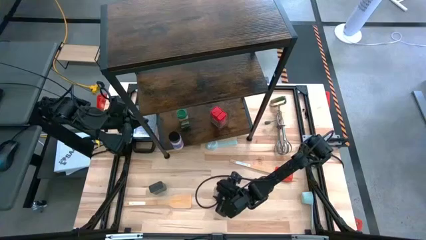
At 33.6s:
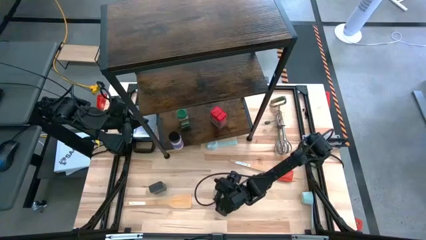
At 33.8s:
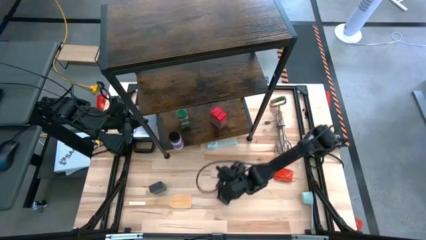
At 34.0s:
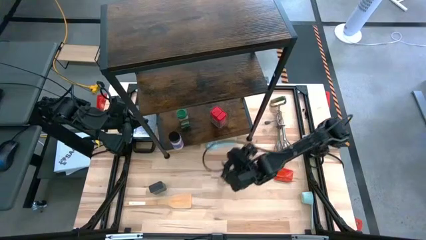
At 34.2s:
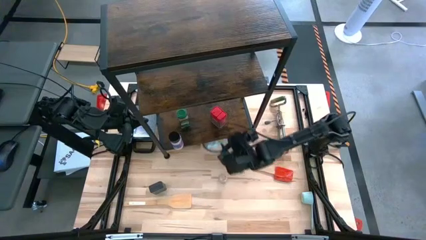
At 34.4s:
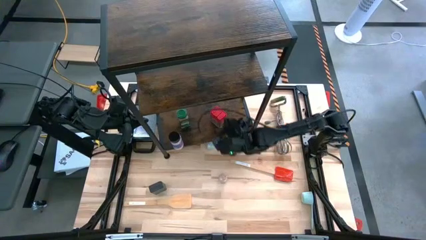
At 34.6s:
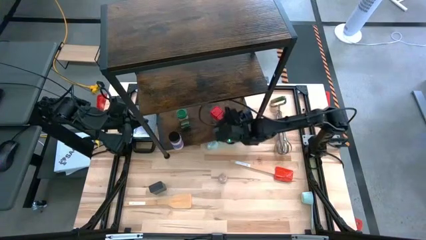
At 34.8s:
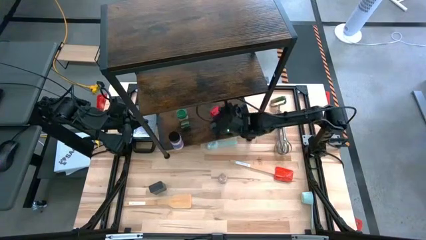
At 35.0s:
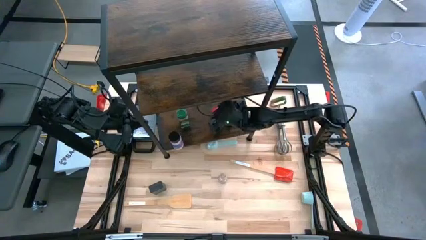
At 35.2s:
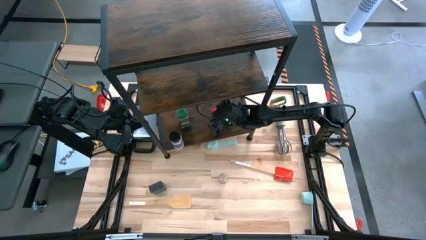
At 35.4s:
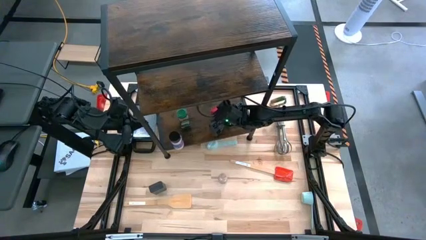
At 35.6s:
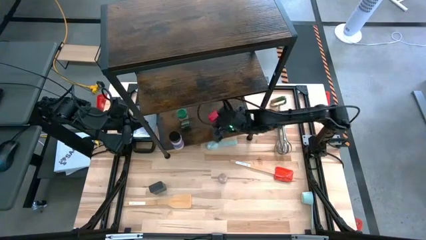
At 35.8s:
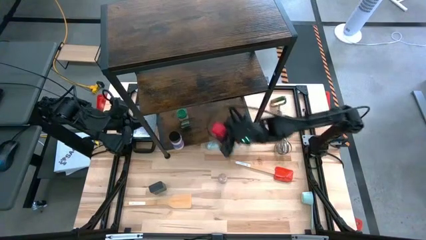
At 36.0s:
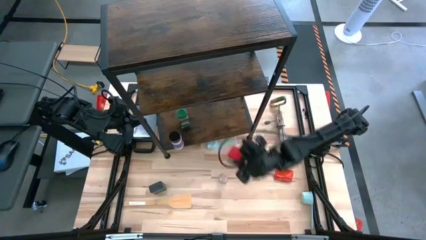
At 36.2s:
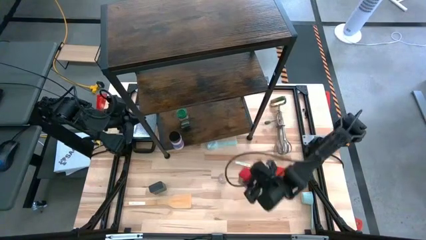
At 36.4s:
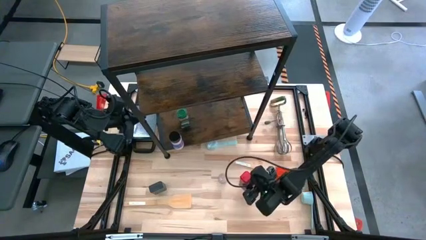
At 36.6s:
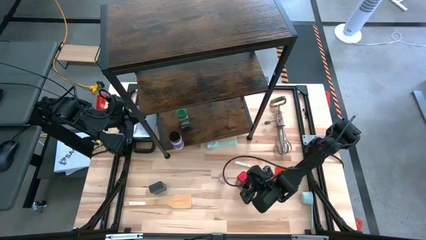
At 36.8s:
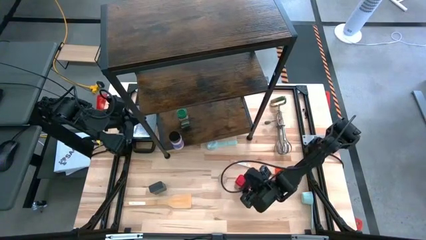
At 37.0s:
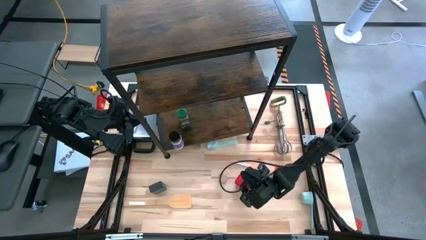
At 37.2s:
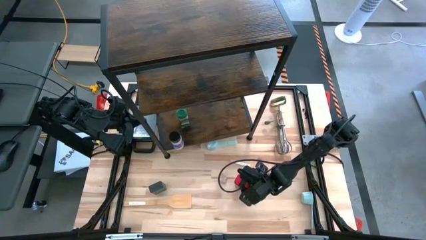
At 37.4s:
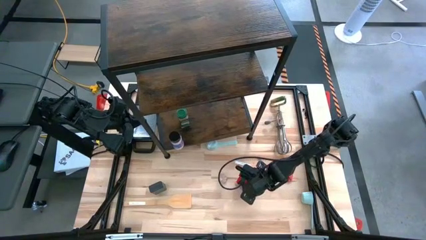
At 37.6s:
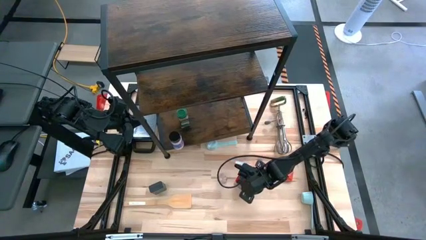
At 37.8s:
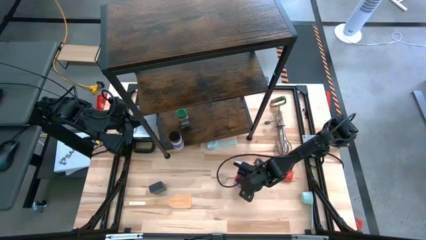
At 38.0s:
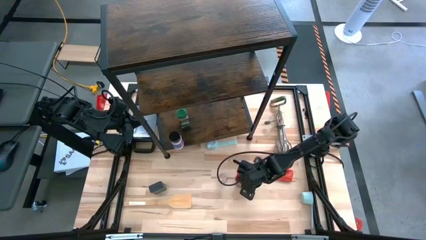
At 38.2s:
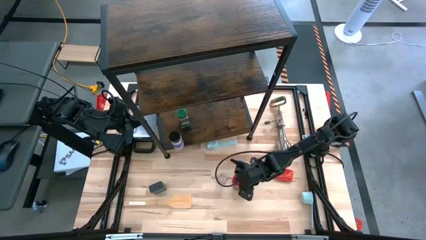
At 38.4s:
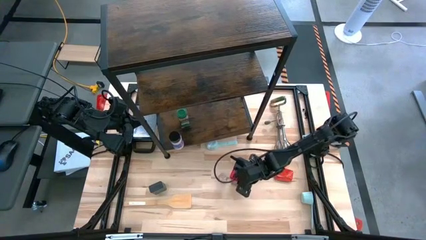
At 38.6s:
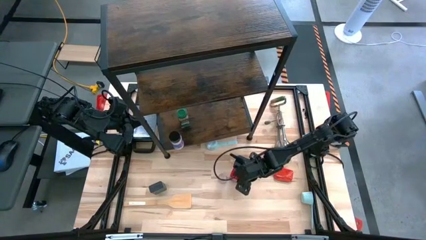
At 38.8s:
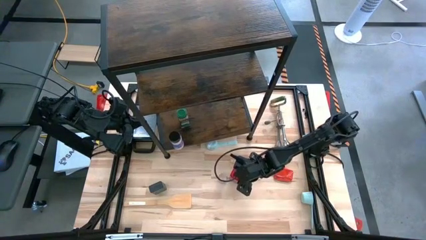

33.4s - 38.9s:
Task: Shelf spices
Remove the red seasoning can from the shelf

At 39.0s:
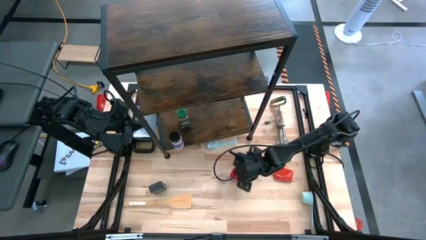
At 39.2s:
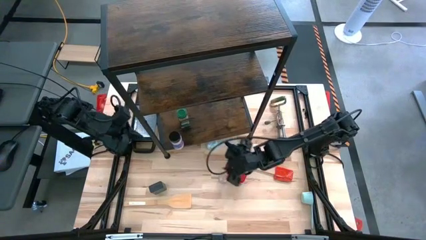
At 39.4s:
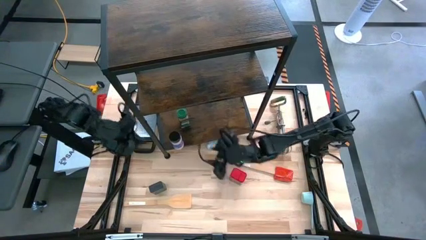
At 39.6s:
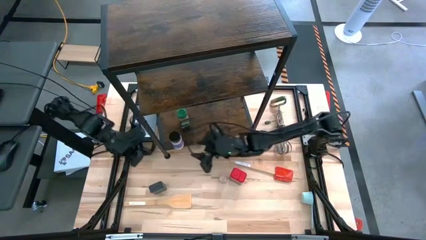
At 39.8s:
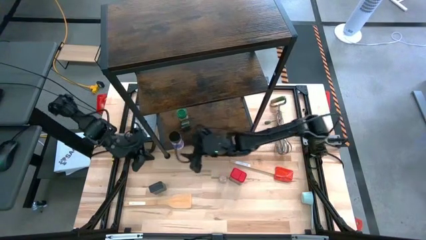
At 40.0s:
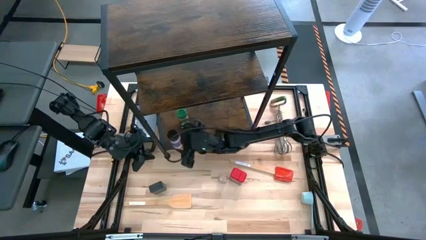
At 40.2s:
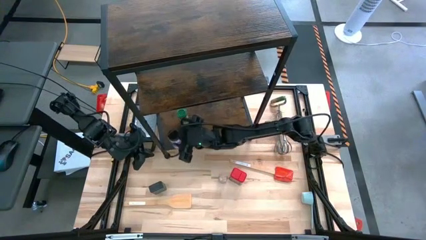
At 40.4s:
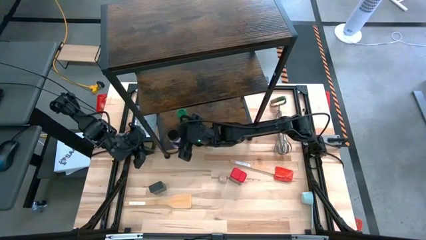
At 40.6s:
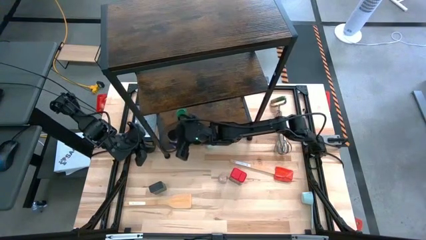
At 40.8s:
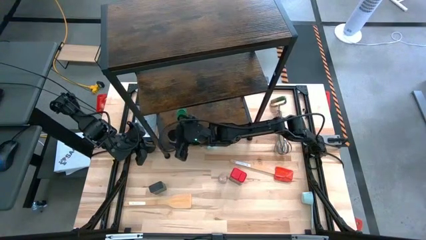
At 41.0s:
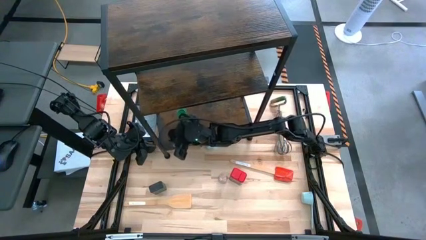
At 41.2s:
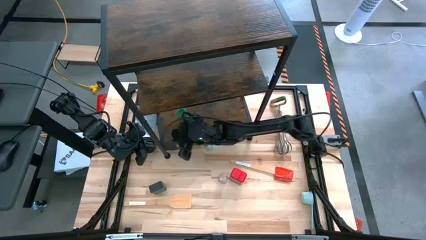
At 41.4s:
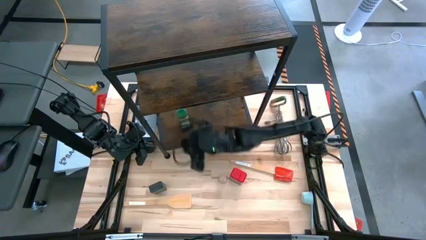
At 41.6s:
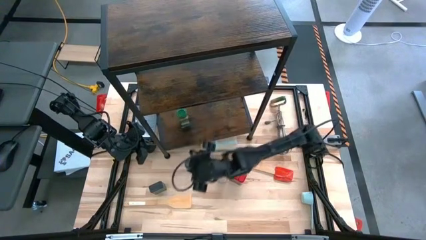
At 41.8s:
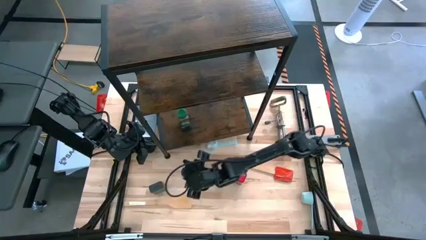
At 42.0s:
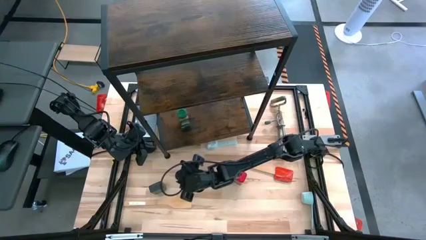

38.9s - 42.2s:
Remove the purple seasoning bottle from the shelf

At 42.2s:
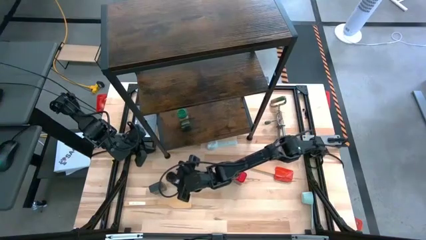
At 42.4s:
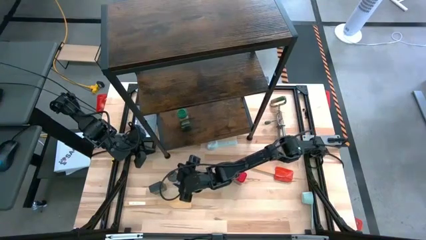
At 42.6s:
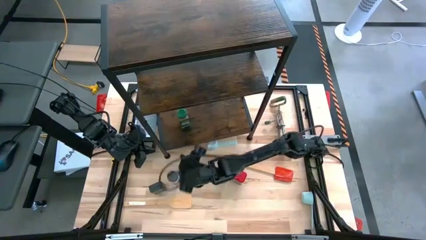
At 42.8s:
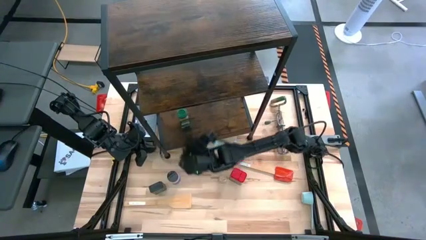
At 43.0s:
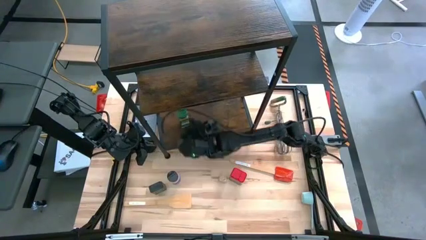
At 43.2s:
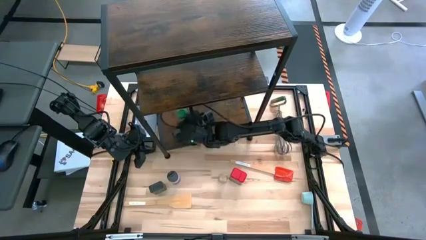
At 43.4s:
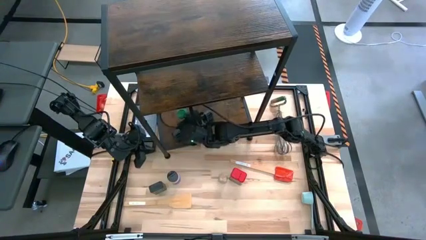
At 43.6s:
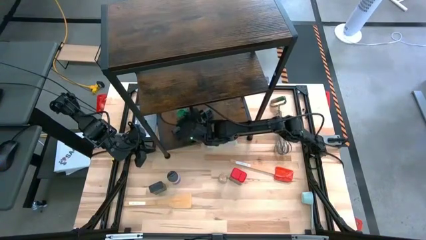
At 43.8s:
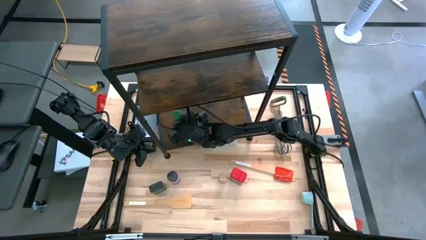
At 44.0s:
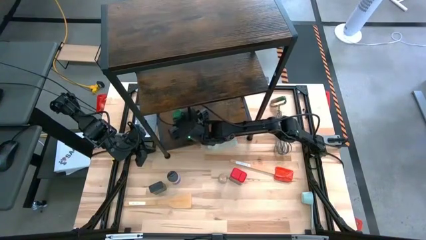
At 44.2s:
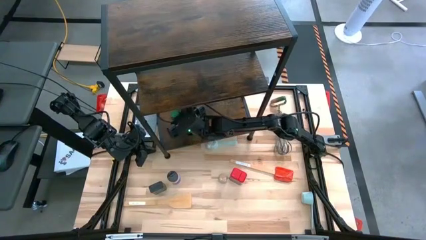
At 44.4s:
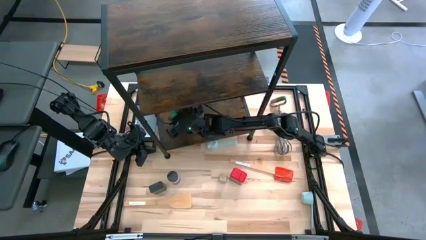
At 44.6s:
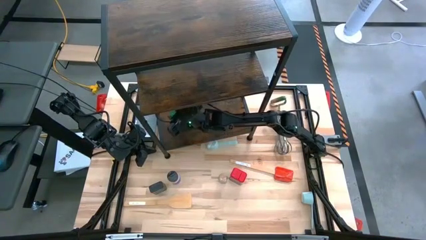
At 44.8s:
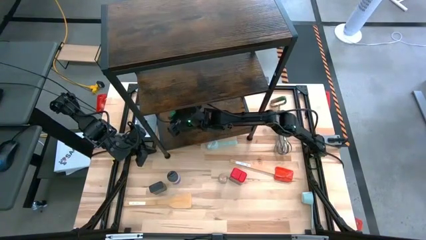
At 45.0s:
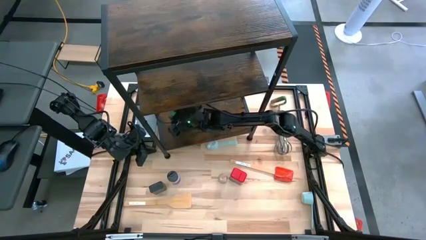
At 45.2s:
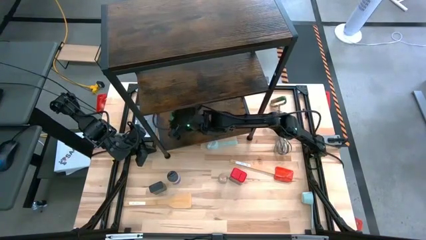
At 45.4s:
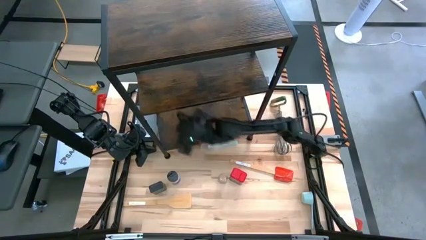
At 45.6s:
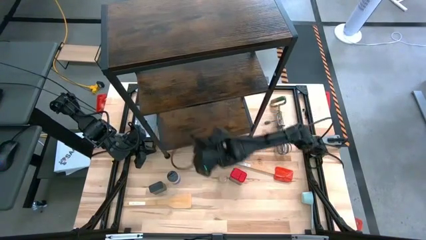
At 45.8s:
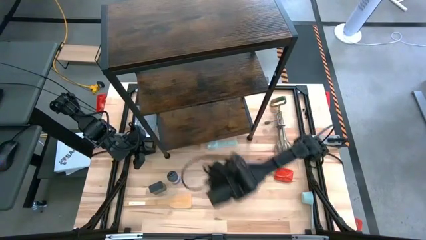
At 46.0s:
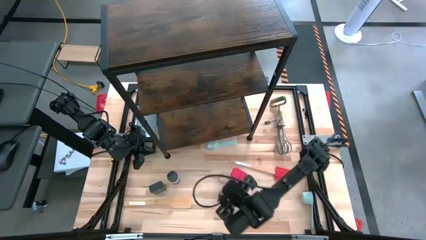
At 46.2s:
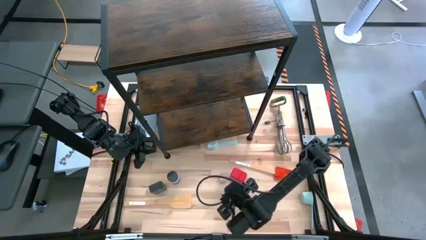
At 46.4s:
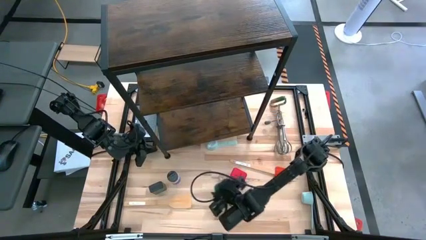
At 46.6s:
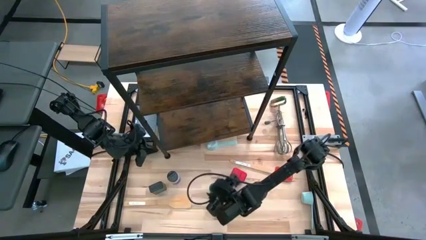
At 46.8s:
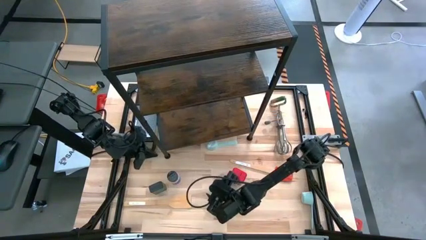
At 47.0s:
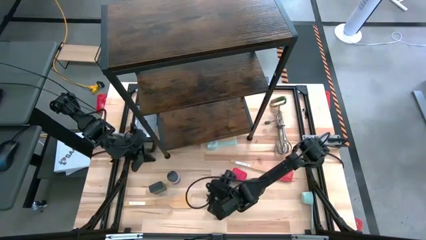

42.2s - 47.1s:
Remove the green seasoning bottle from the shelf

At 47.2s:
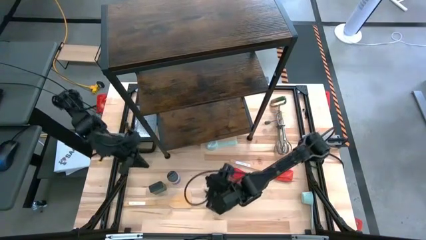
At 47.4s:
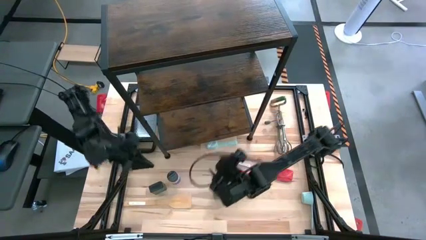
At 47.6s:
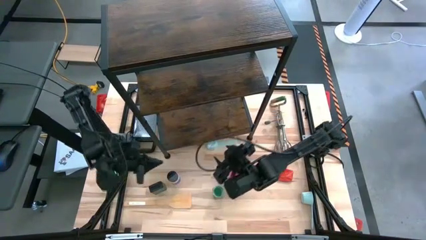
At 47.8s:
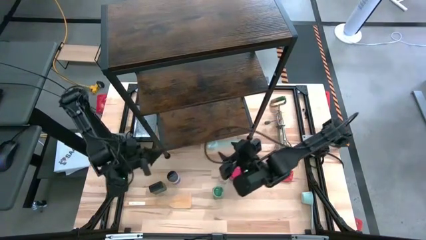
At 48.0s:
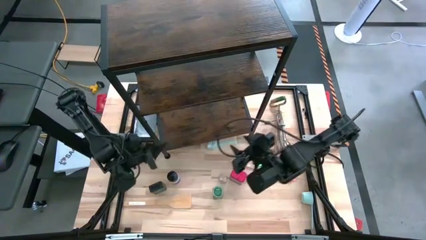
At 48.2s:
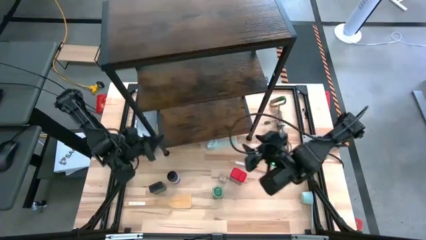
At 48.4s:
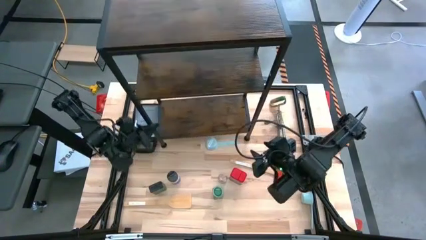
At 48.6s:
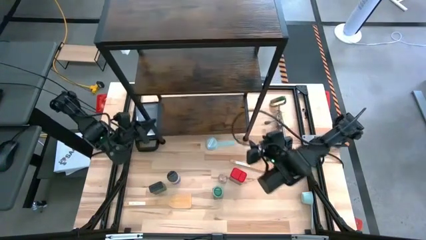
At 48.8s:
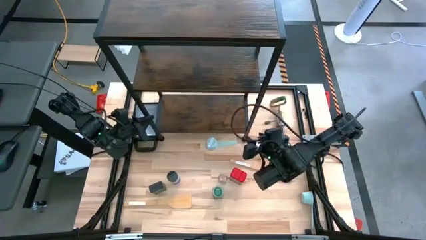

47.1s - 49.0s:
Adjust the shelf on the table
